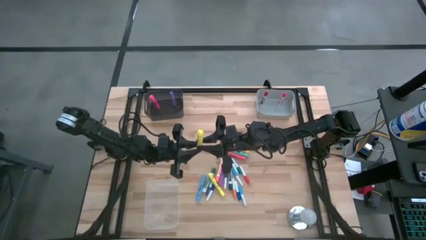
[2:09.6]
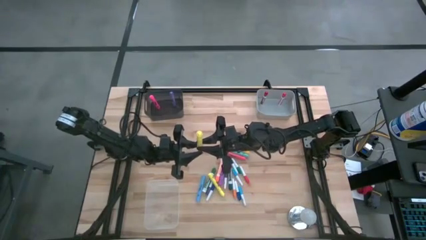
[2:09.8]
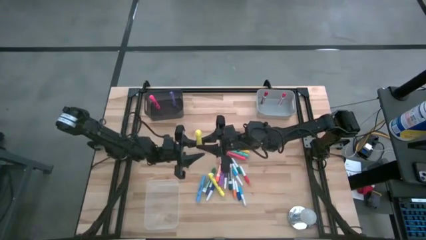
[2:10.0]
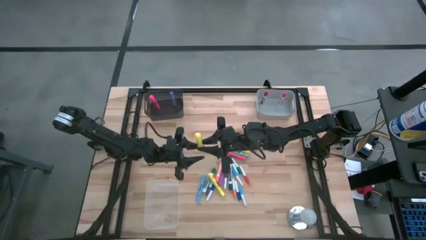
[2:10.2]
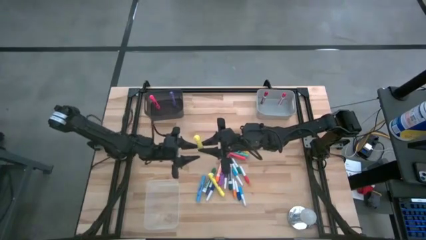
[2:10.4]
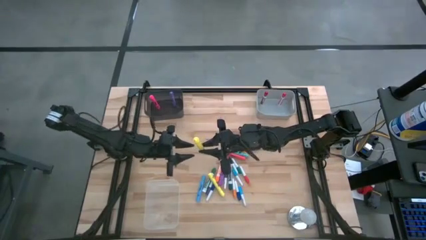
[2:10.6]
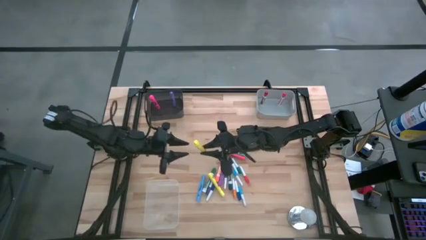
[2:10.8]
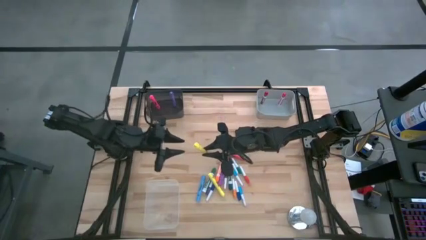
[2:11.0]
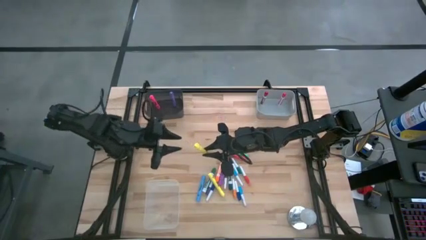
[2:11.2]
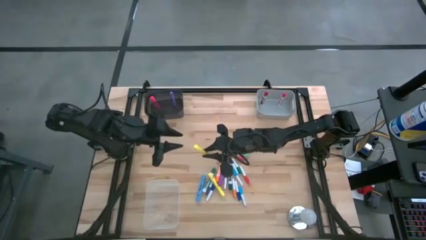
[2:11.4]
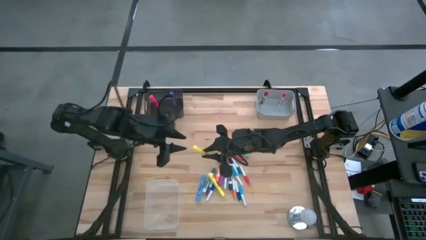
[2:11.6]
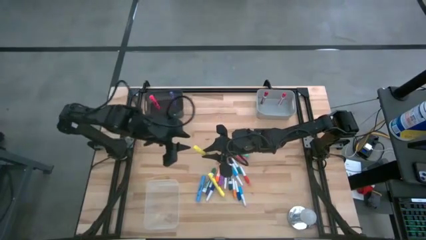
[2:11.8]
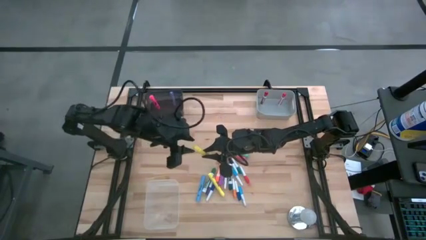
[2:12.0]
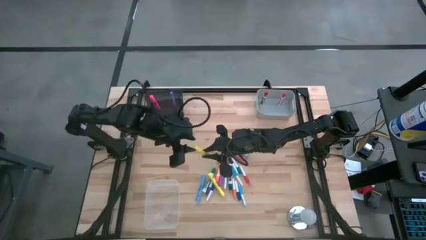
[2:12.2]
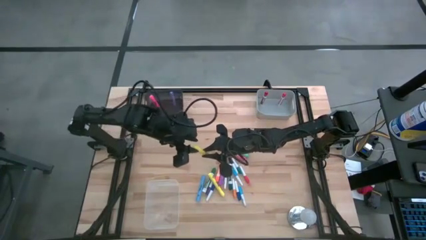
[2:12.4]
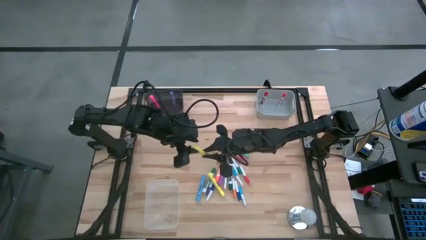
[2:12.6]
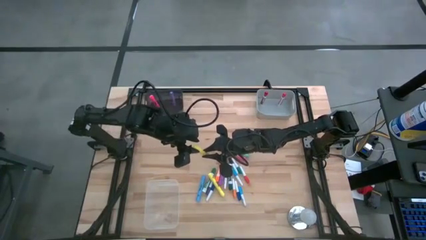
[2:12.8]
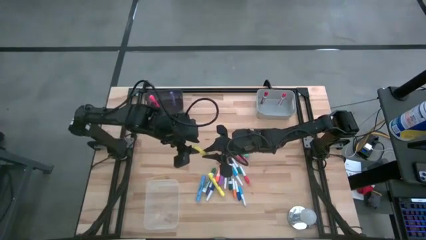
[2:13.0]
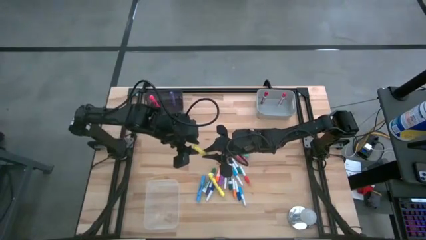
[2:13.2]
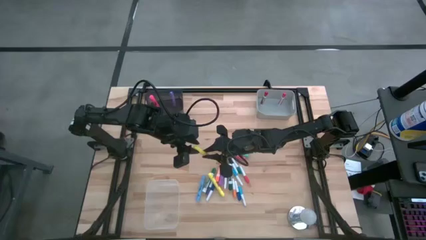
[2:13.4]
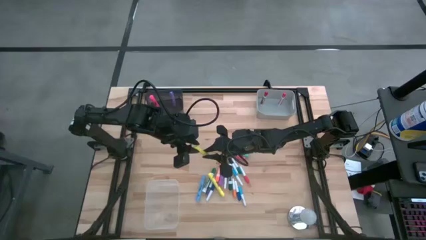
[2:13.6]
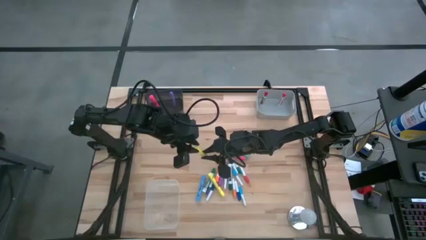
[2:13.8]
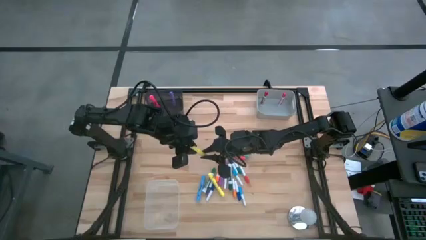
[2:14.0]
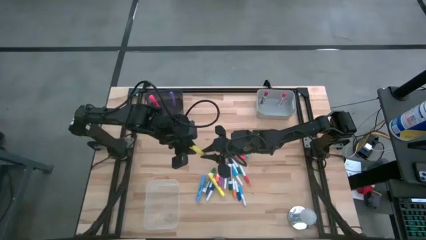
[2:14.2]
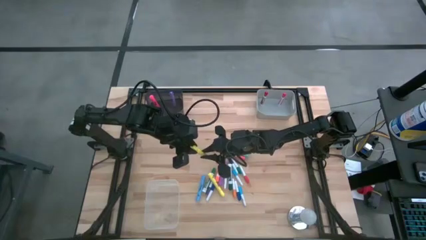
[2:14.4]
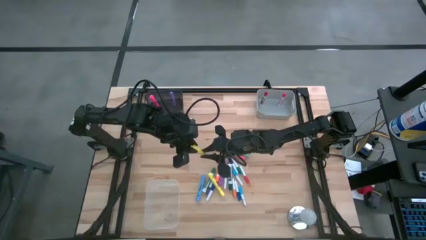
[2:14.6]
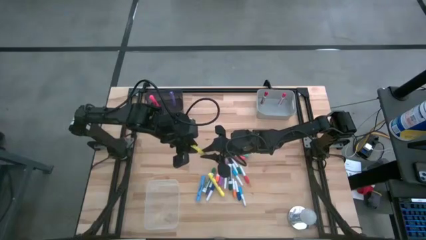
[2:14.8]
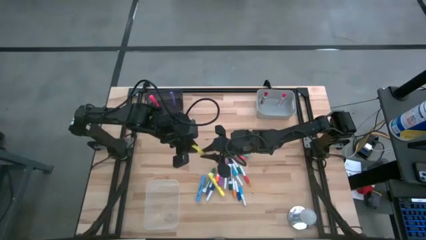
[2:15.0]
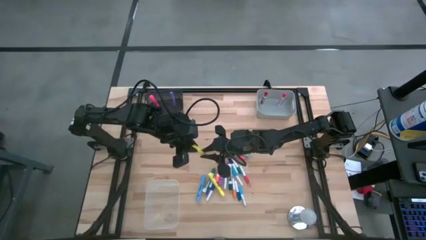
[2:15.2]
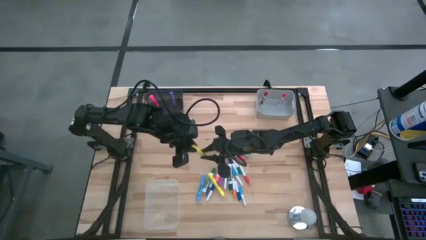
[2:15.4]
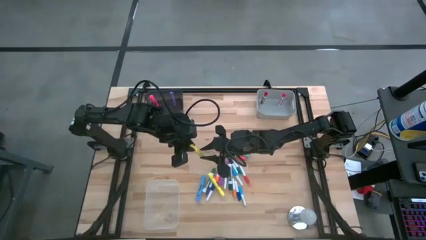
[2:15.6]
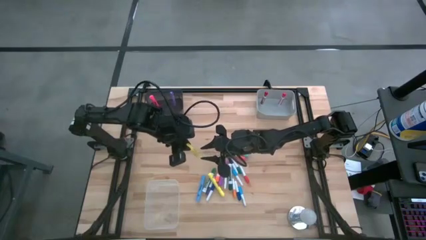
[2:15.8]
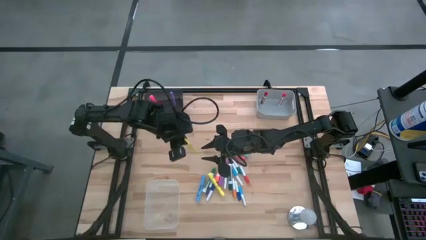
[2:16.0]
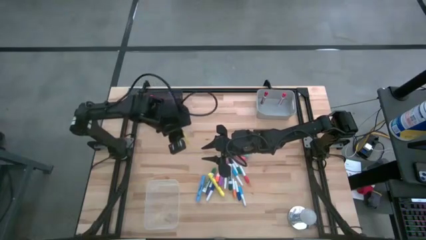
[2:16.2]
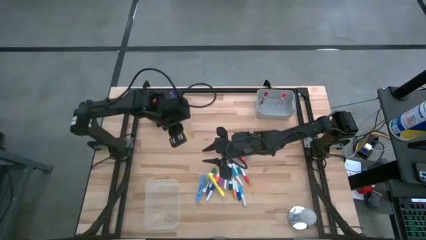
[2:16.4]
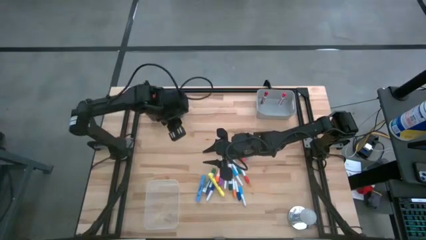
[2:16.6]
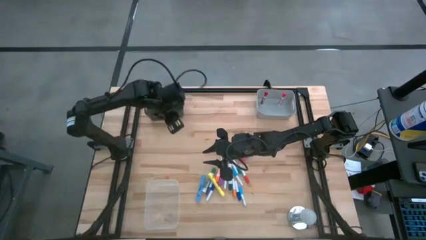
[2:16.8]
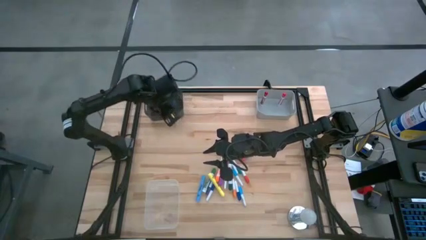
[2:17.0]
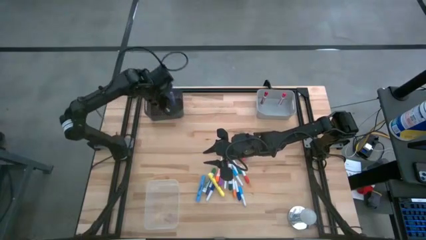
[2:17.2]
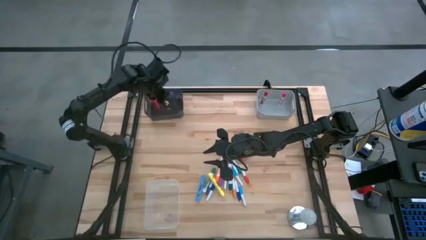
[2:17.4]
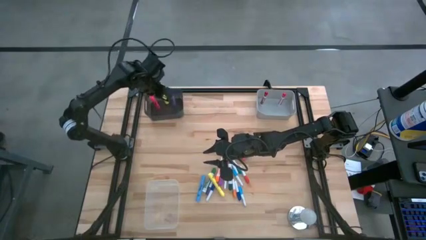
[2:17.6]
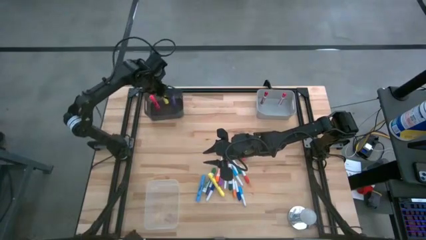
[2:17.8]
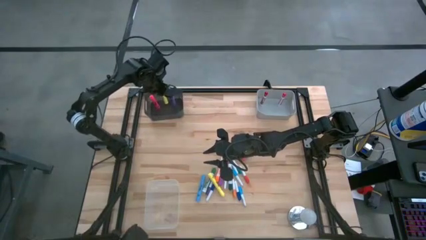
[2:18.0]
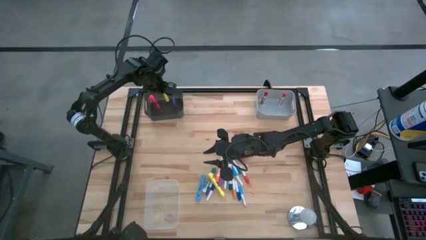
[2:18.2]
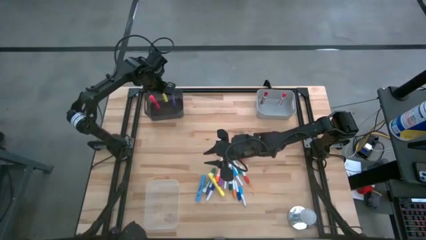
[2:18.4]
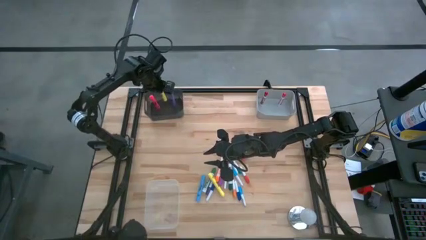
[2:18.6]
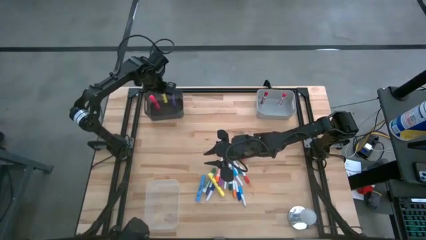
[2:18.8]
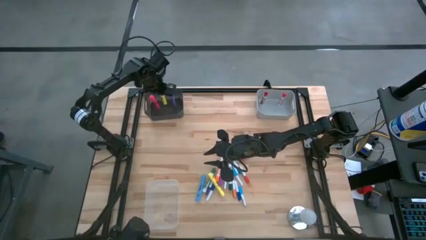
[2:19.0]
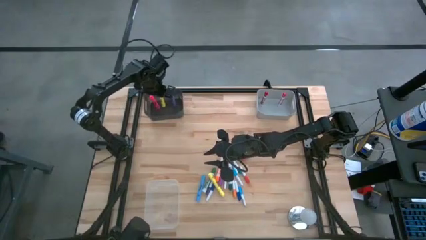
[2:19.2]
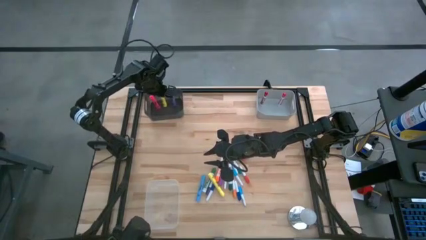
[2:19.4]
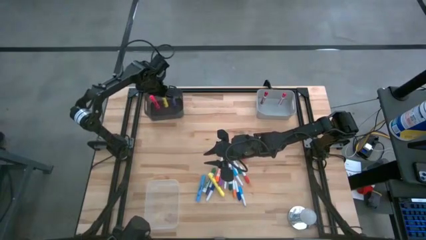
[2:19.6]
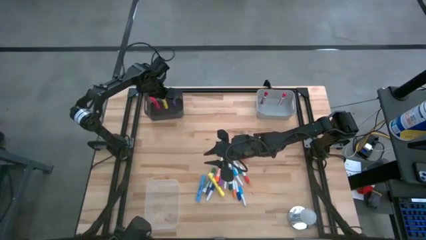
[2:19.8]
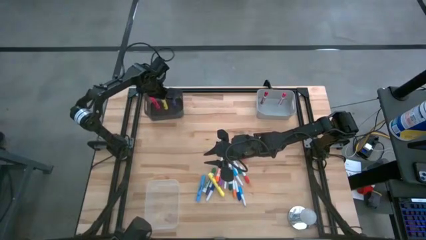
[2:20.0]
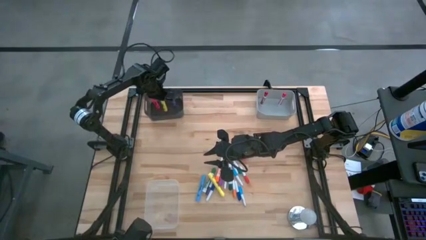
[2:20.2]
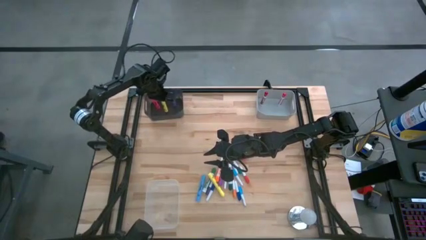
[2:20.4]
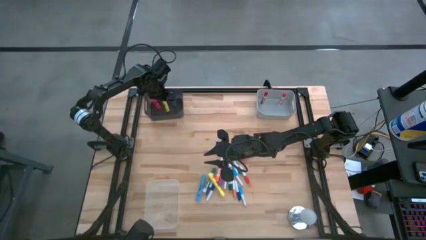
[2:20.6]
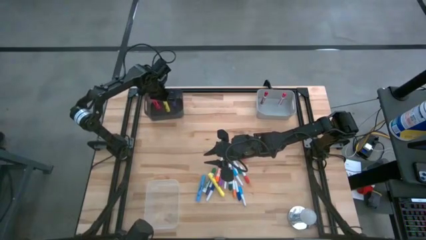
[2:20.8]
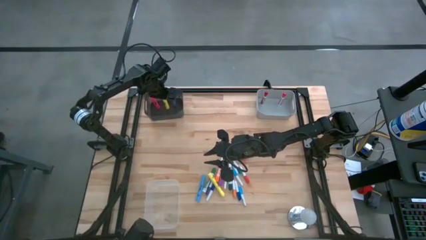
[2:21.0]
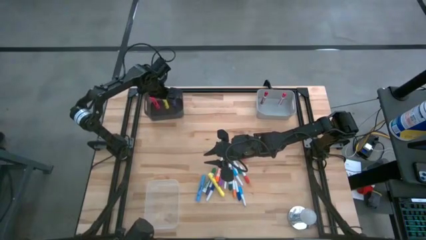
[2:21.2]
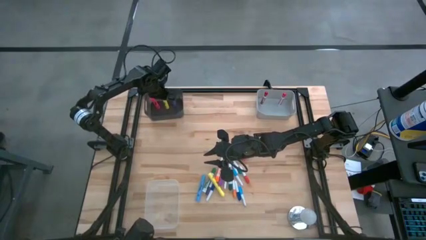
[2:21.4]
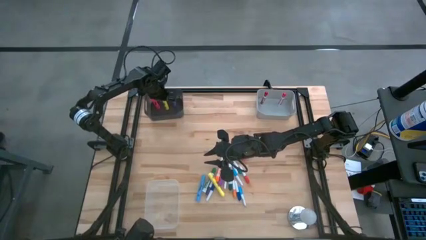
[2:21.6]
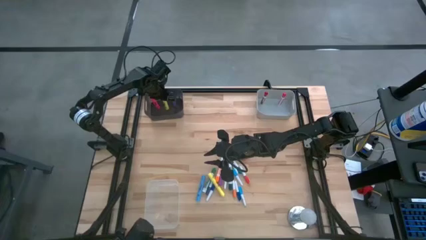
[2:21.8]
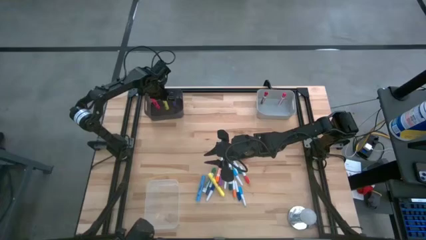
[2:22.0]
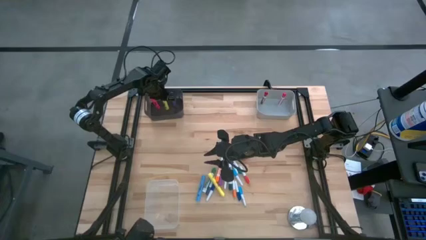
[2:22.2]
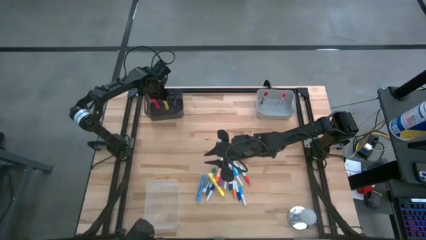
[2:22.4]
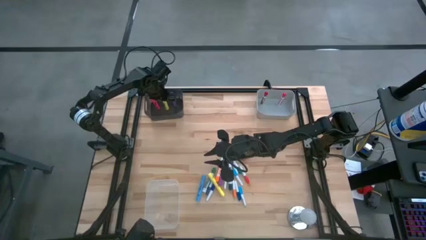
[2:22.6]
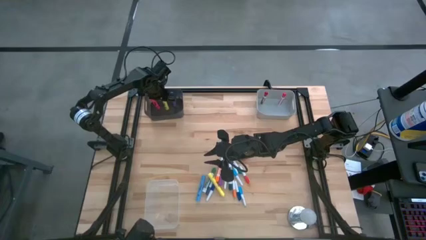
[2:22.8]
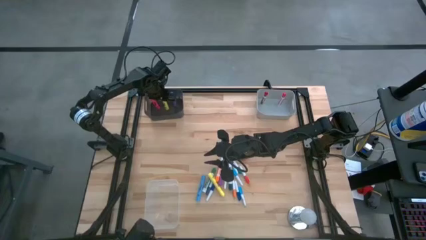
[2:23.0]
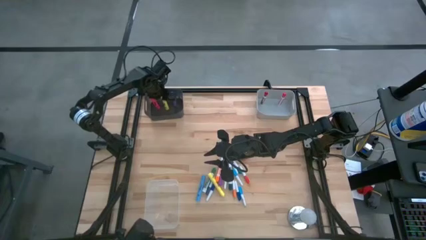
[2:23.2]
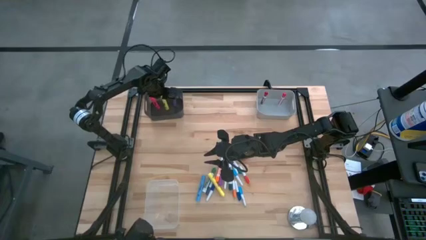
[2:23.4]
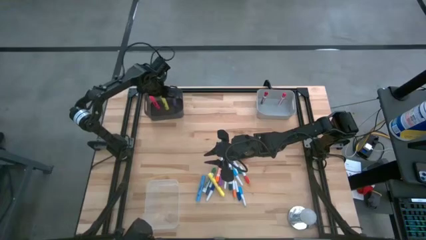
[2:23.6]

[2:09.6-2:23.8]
Task: Pick & Place Markers
Put the yellow highlighter pen into the black bin

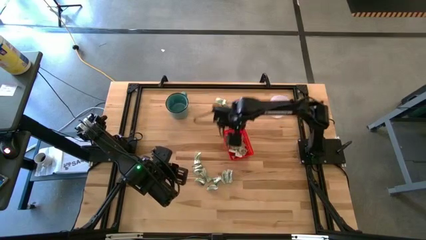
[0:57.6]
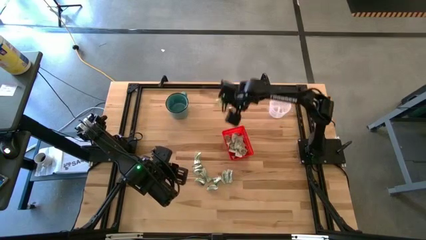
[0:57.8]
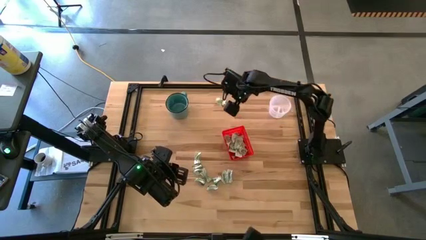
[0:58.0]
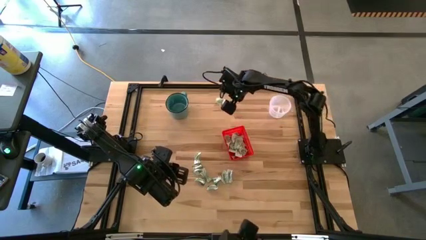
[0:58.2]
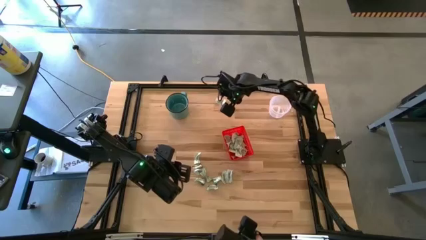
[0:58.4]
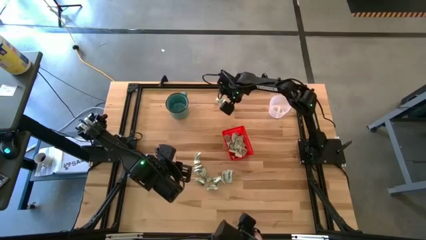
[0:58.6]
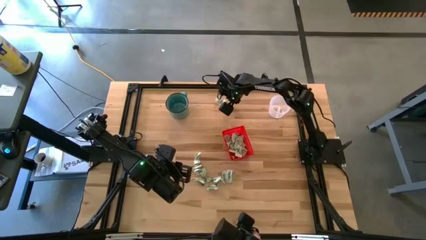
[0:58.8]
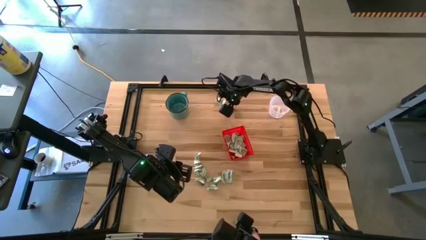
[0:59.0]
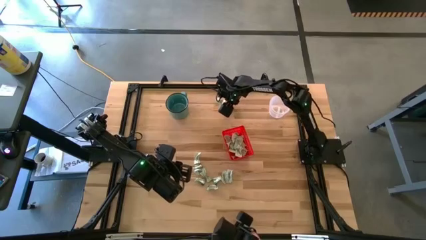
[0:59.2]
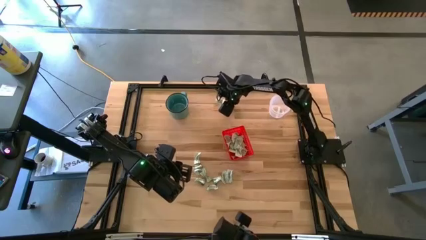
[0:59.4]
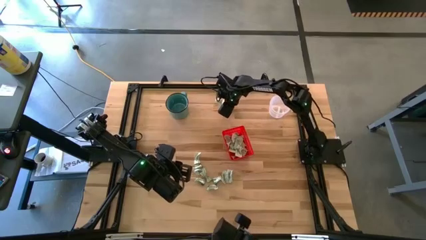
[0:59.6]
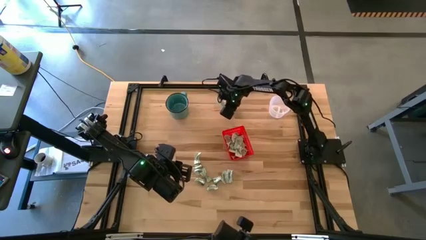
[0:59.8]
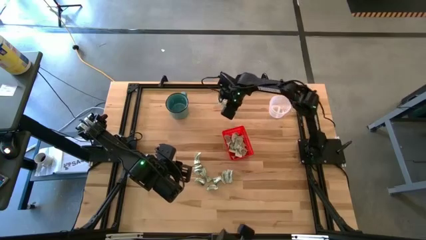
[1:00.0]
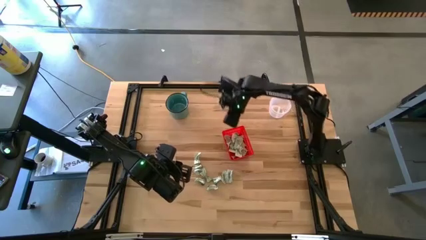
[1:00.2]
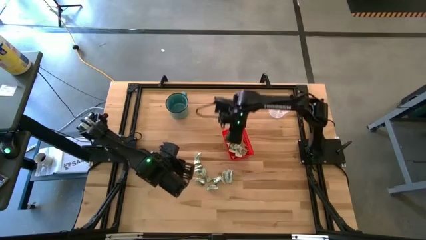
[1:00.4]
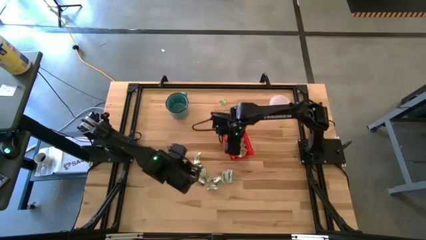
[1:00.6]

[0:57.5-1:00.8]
Task: Pick and place items into bin
Put the stevia packet into the orange bin
